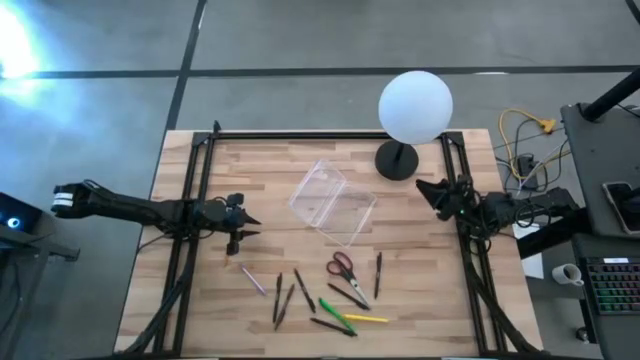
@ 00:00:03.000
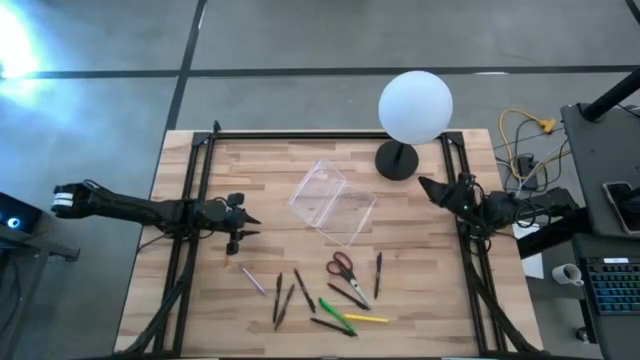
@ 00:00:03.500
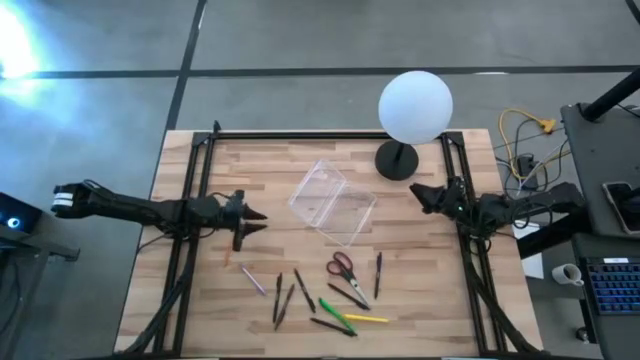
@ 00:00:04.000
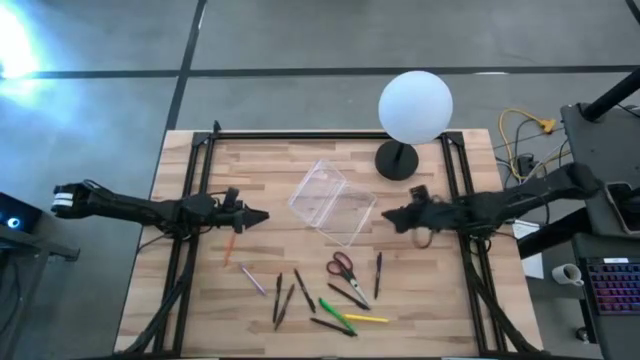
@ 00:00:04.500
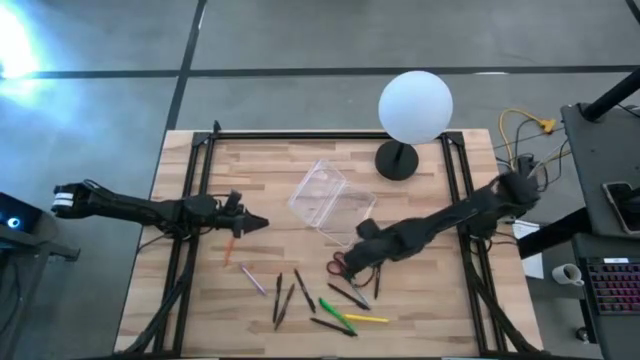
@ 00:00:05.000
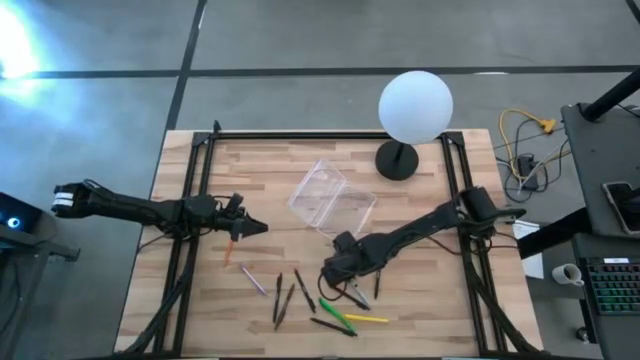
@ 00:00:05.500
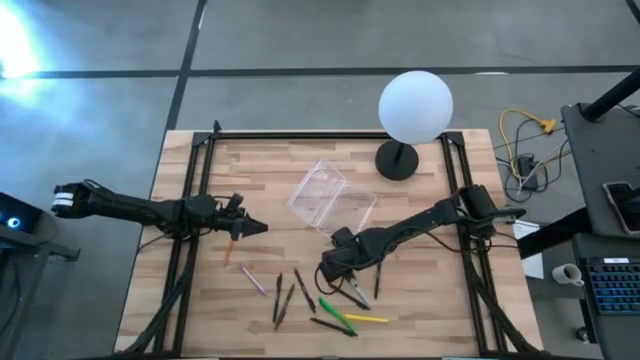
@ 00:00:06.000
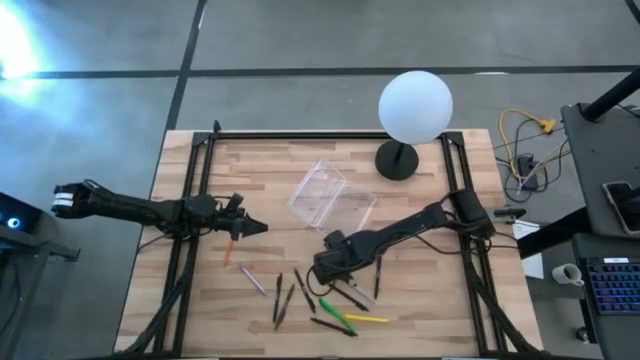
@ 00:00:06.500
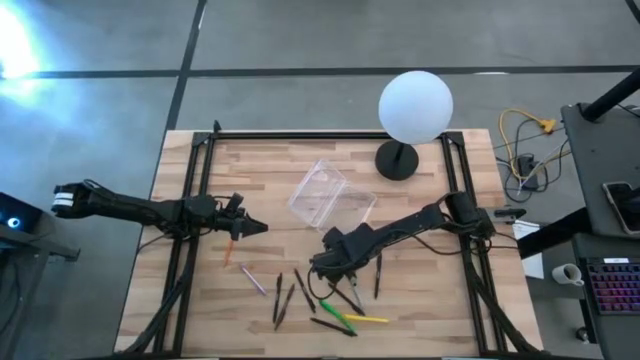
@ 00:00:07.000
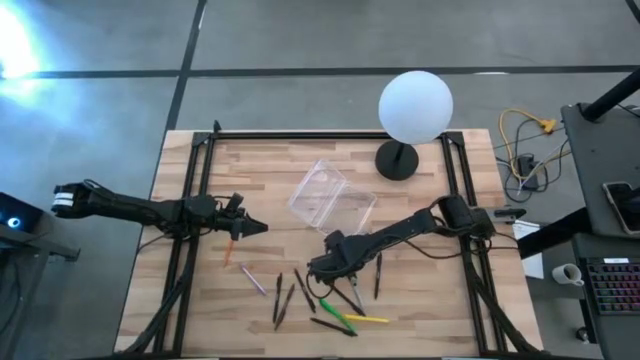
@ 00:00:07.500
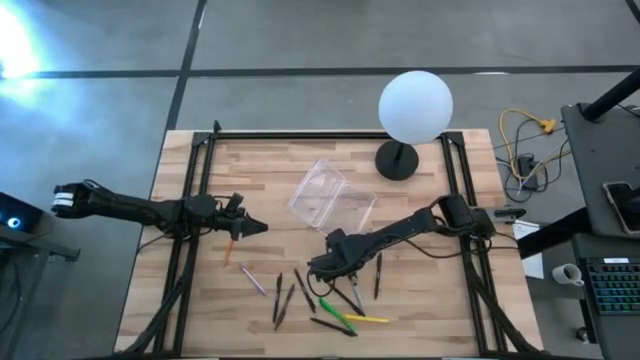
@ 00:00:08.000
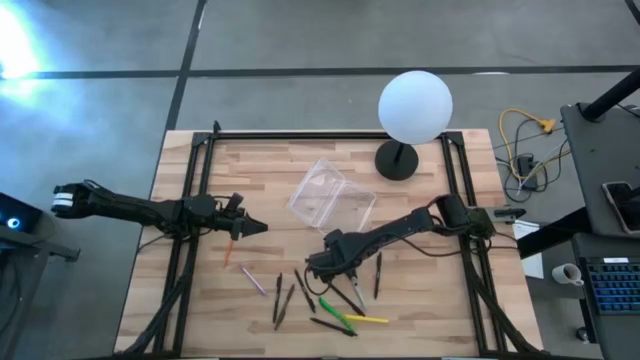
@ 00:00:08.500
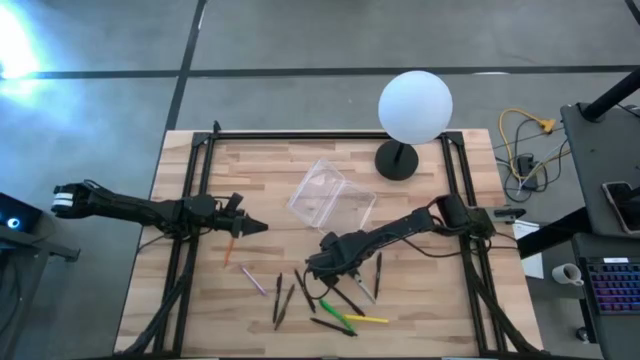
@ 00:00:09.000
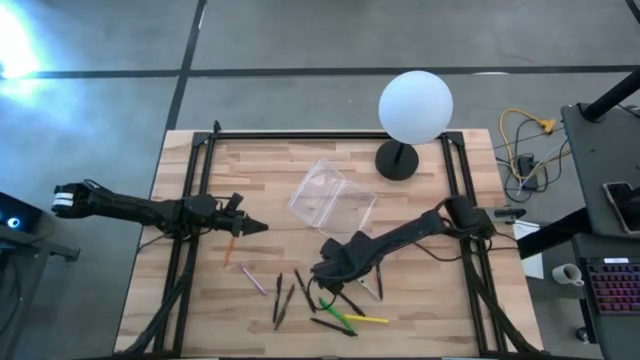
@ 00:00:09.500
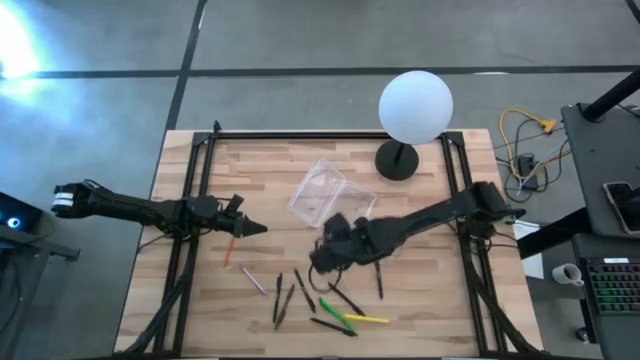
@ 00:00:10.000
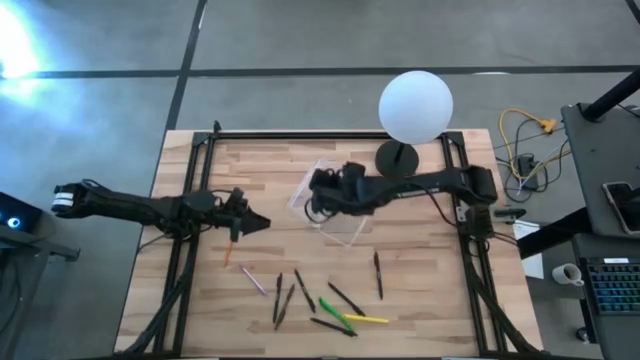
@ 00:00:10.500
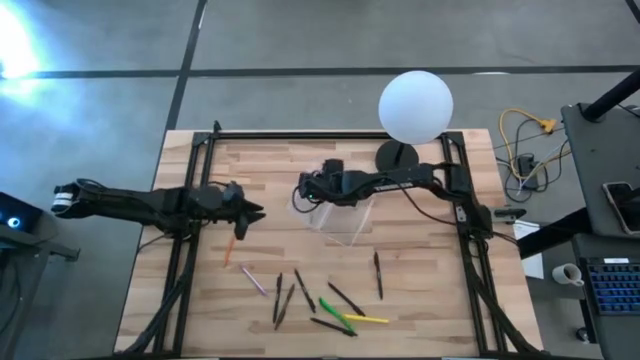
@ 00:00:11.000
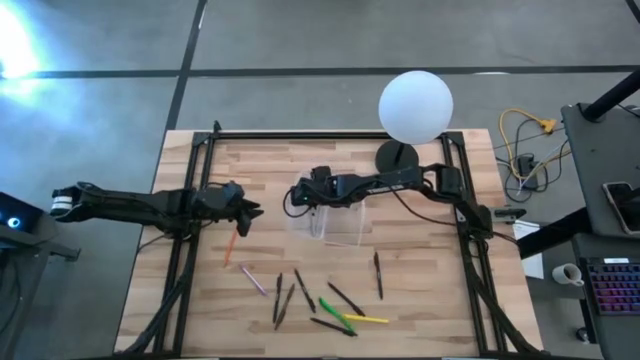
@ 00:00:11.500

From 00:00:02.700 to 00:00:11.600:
Task: Pick & place school supplies into a supply box
Put the black scissors into the transparent supply box

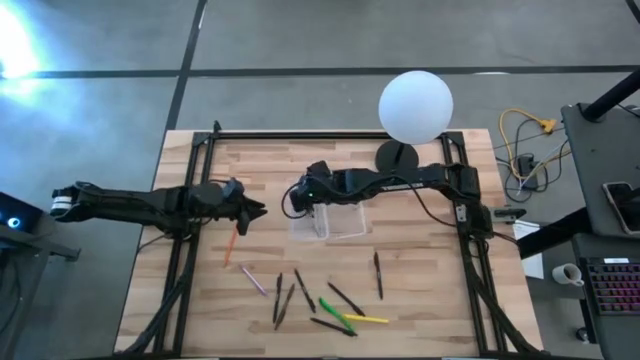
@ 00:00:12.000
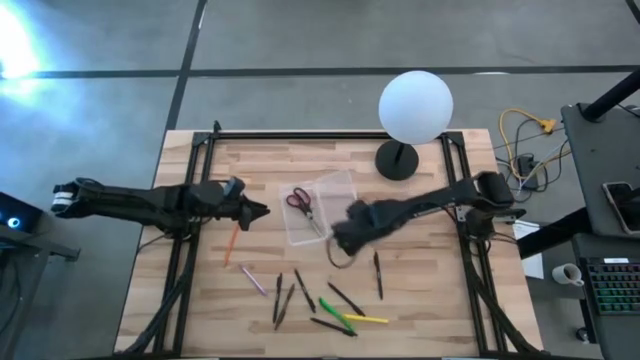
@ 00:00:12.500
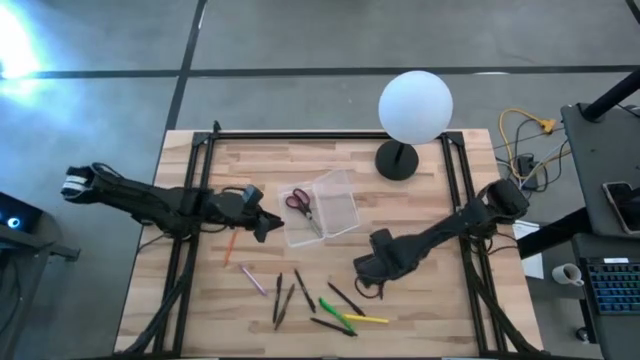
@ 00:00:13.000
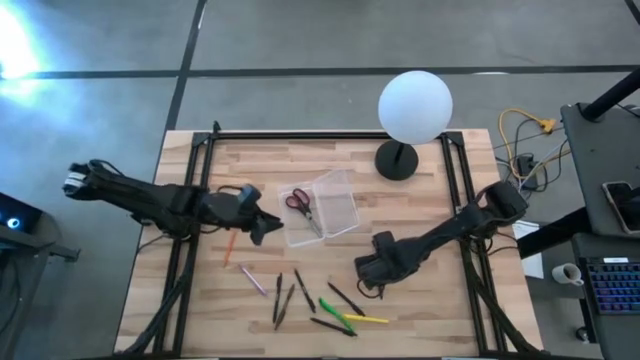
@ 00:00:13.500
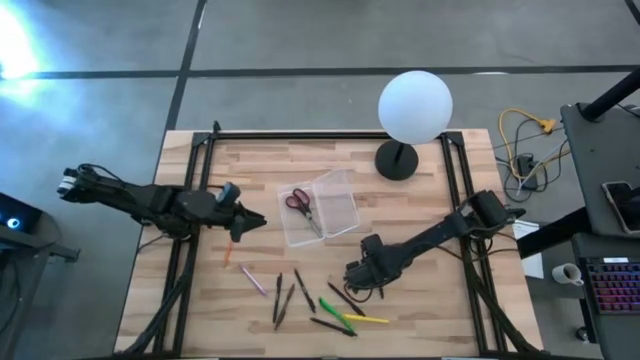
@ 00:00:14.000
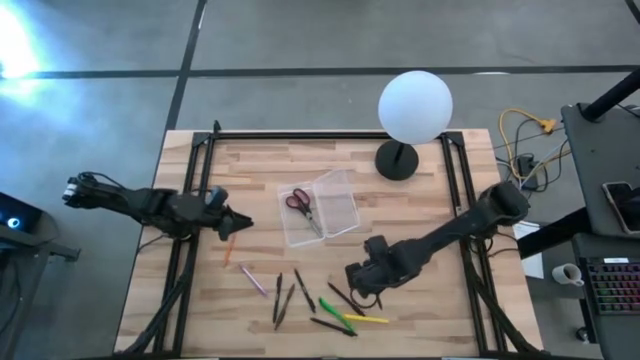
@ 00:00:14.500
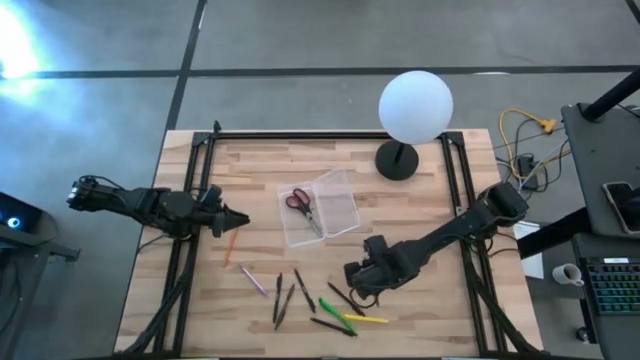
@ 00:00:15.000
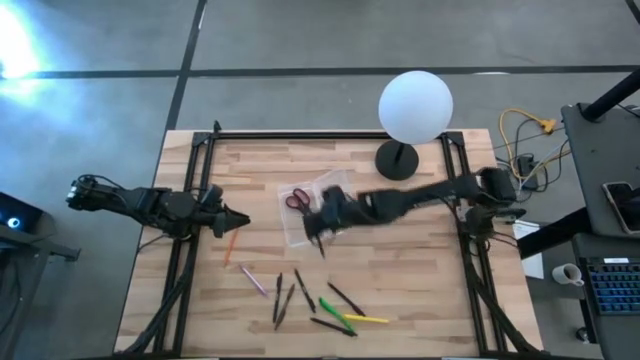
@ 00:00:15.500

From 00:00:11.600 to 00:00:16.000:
Put the black pen into the transparent supply box

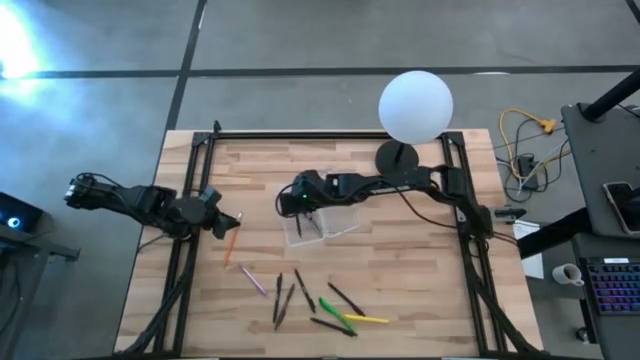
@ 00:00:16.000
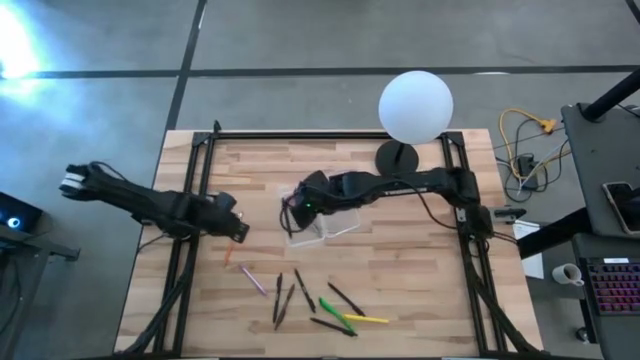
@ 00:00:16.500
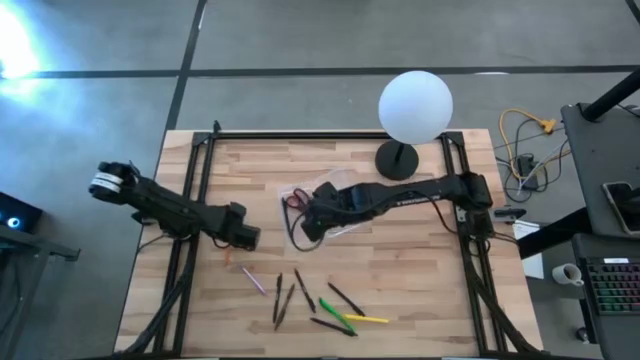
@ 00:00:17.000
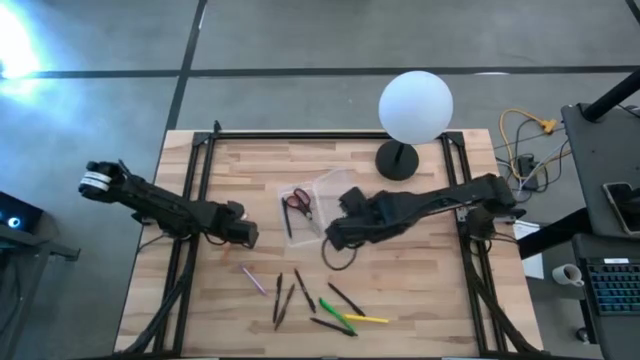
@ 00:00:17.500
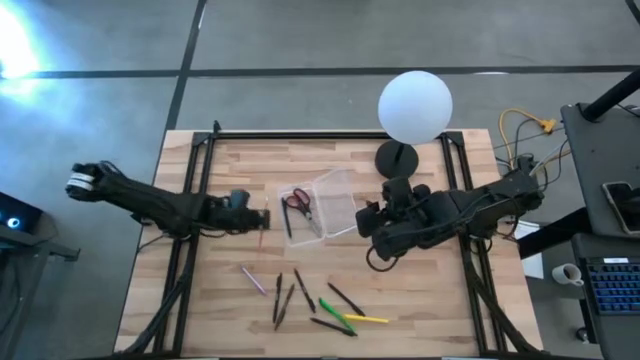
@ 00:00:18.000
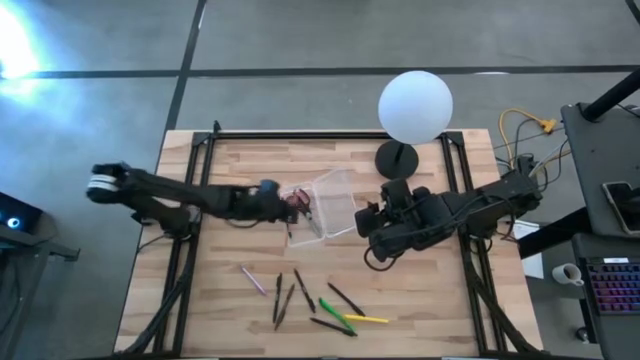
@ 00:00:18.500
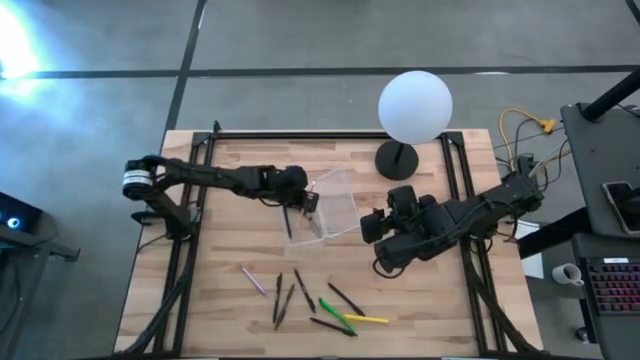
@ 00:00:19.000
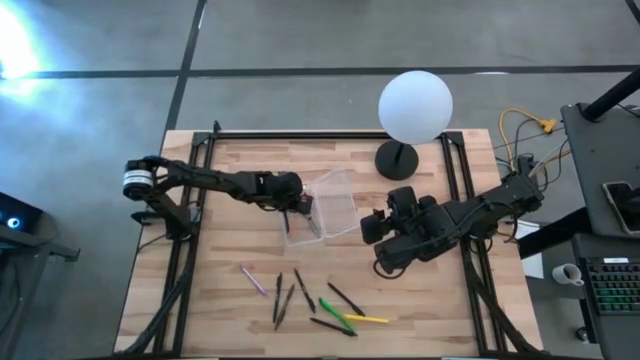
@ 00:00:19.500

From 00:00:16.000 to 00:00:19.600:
Put the orange pencil into the transparent supply box

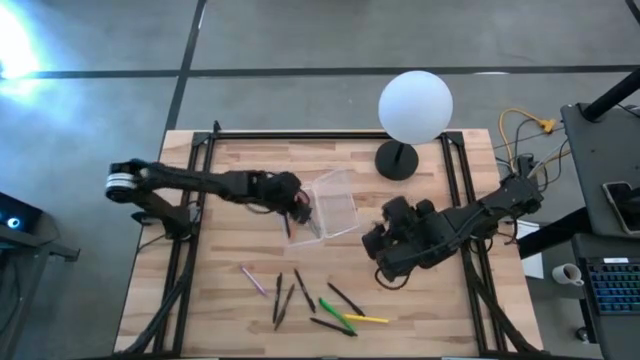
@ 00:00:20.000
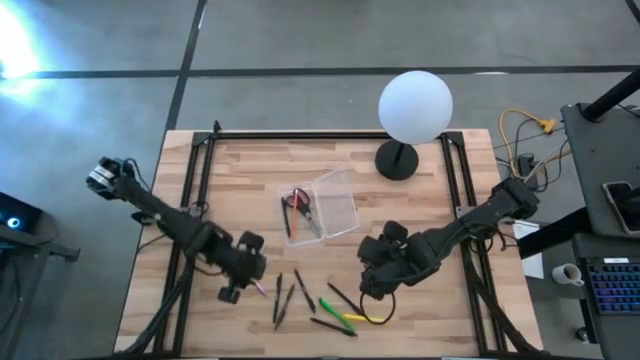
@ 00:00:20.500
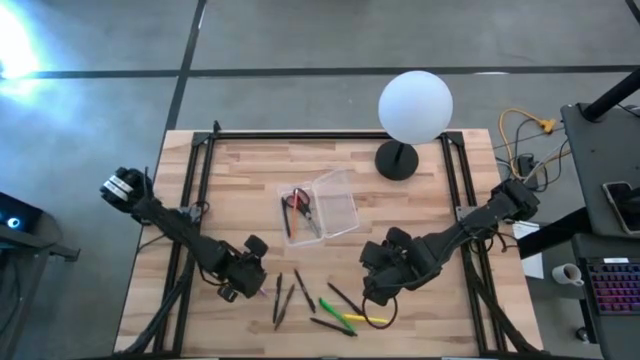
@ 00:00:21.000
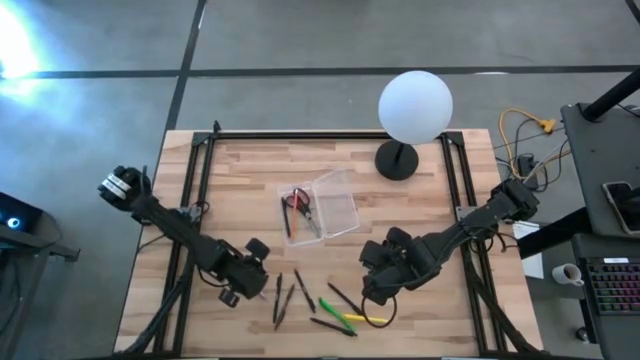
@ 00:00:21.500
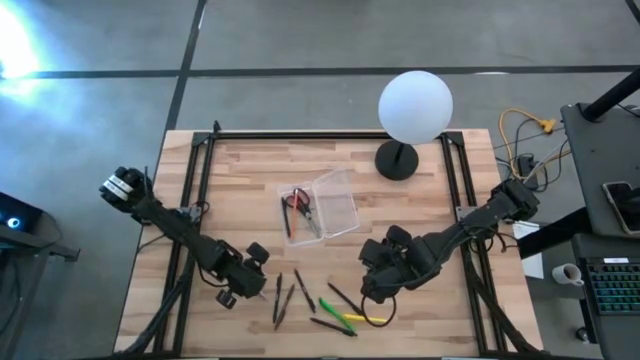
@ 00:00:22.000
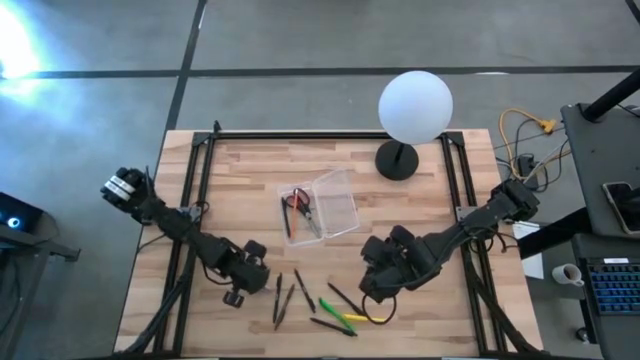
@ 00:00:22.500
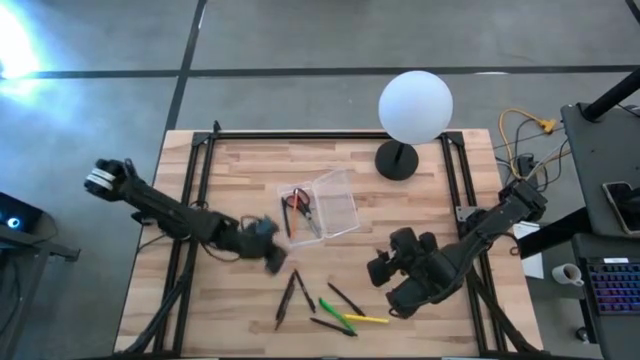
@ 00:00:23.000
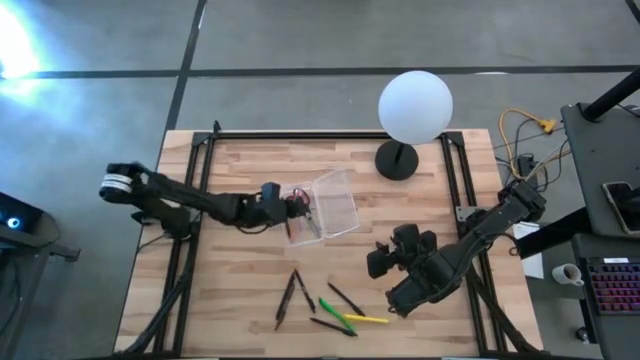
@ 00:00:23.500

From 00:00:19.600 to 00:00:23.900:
Put the purple pen into the transparent supply box

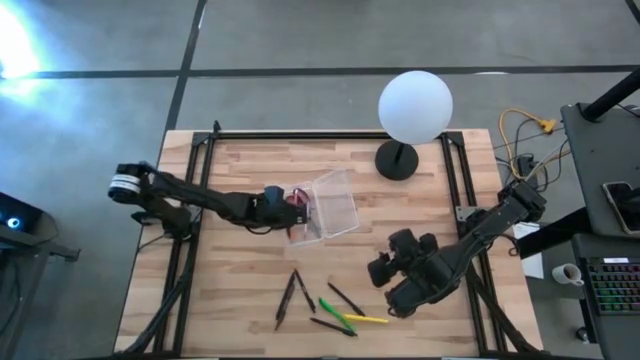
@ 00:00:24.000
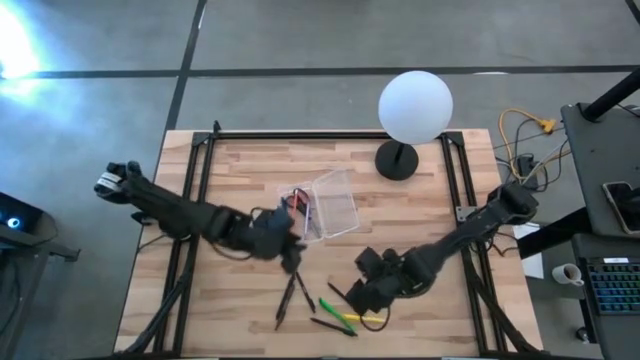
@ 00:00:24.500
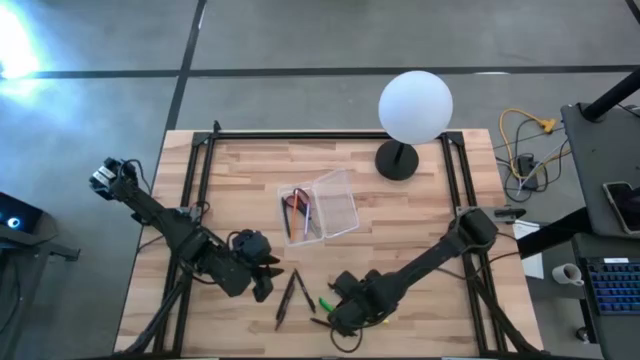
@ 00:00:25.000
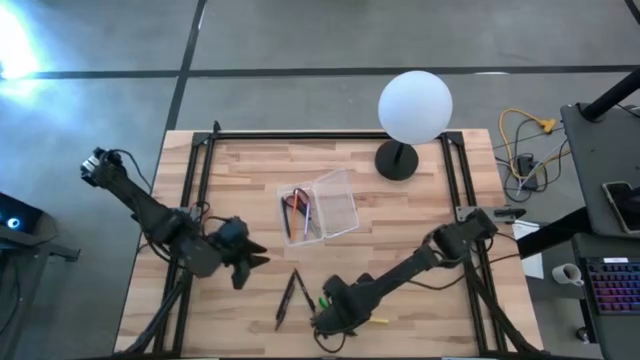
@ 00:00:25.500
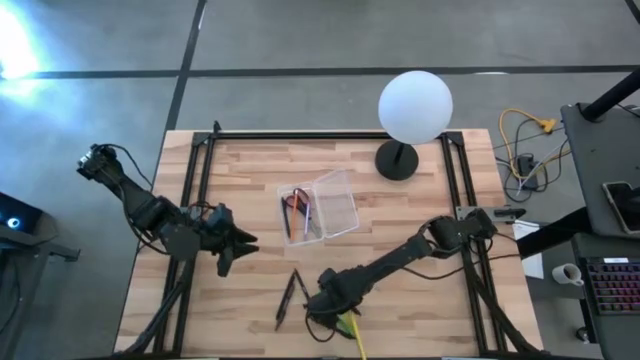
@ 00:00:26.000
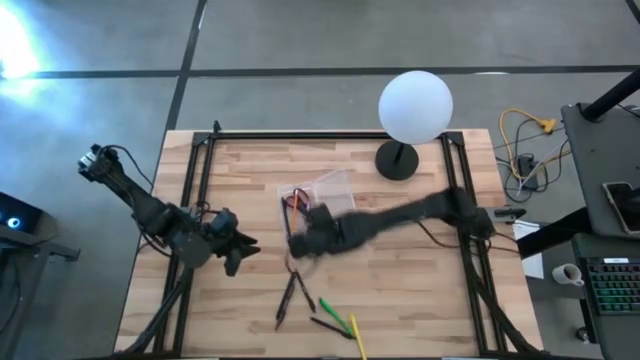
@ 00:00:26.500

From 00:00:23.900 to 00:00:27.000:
Put the black pen into the transparent supply box
